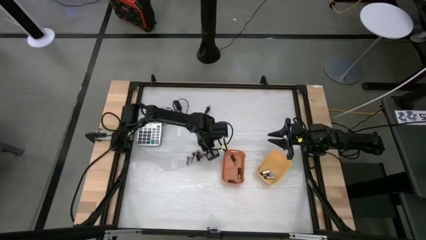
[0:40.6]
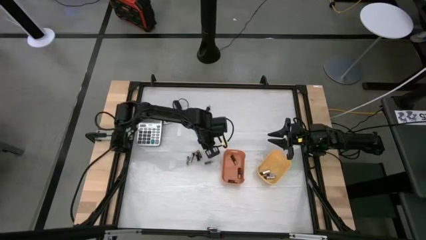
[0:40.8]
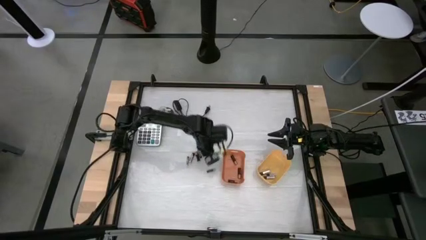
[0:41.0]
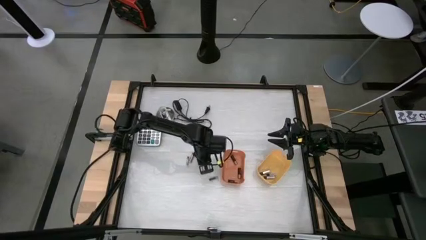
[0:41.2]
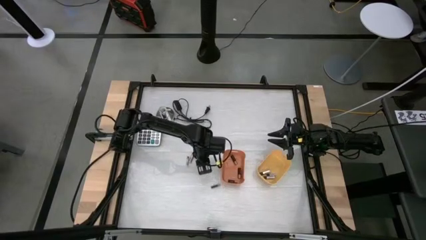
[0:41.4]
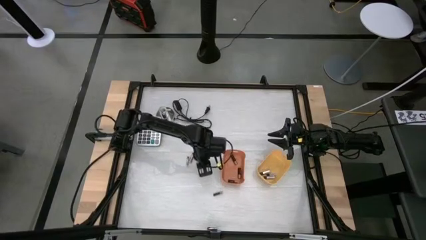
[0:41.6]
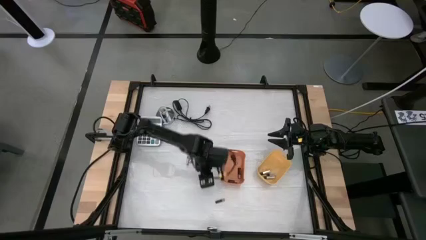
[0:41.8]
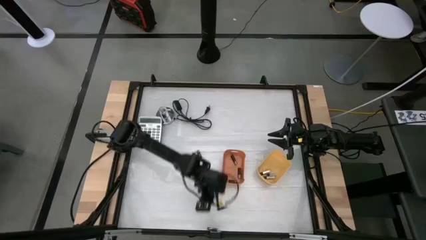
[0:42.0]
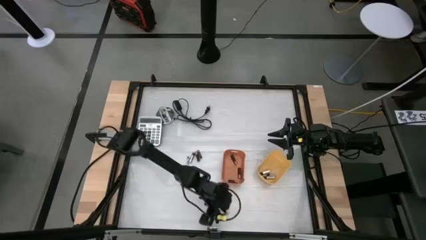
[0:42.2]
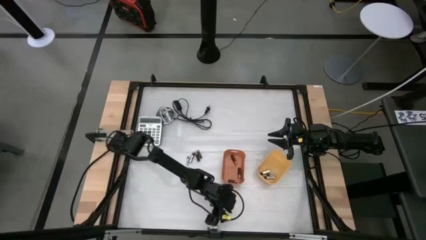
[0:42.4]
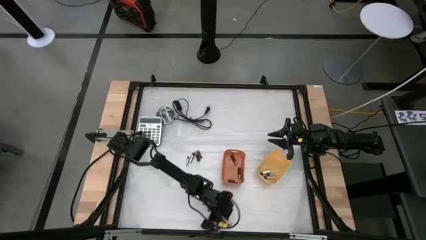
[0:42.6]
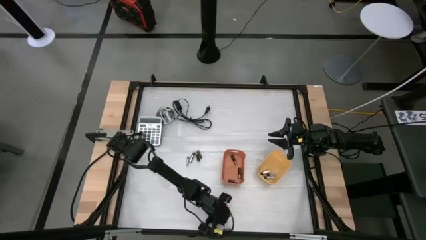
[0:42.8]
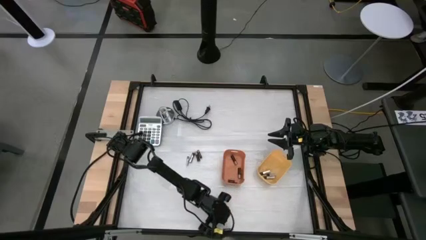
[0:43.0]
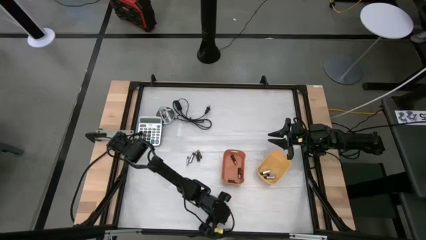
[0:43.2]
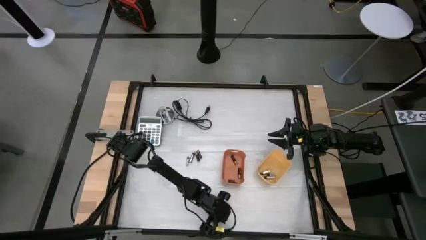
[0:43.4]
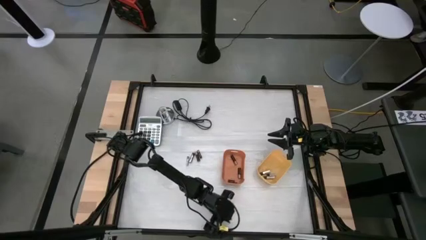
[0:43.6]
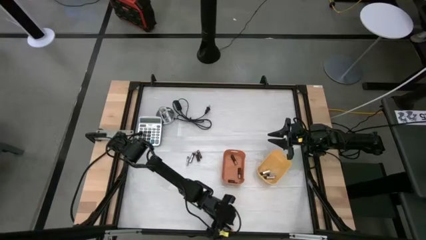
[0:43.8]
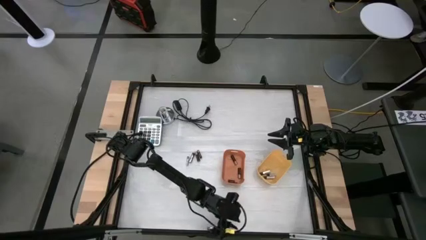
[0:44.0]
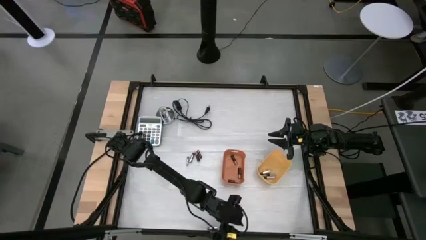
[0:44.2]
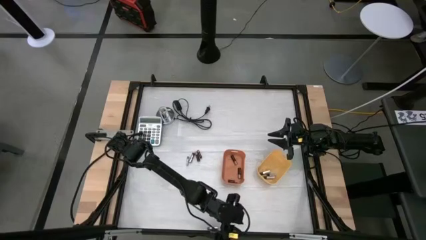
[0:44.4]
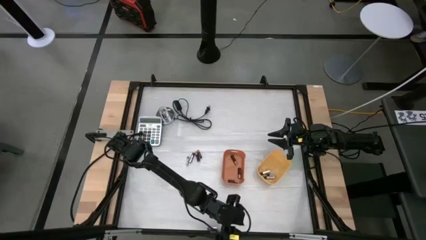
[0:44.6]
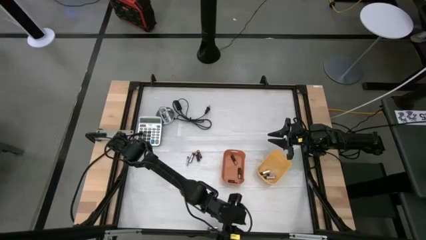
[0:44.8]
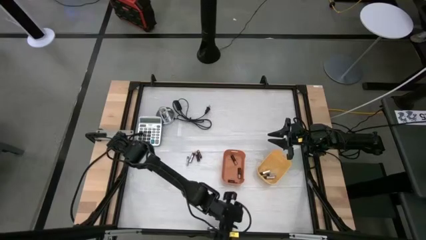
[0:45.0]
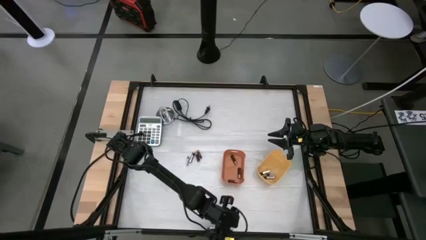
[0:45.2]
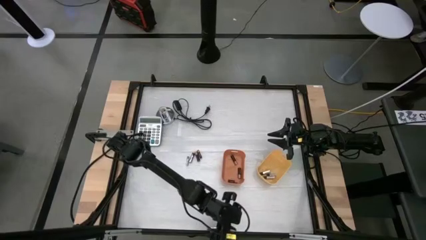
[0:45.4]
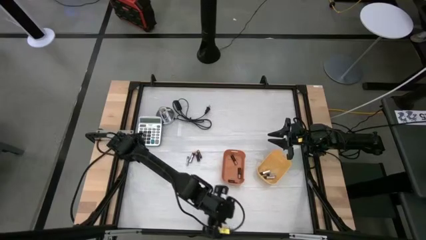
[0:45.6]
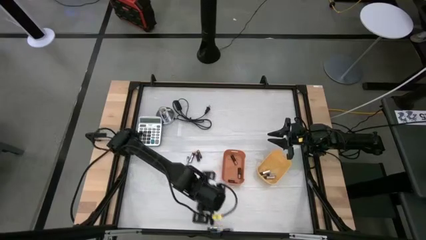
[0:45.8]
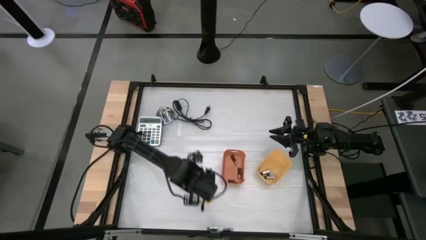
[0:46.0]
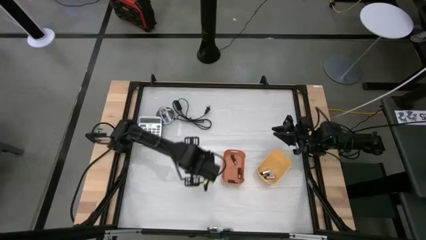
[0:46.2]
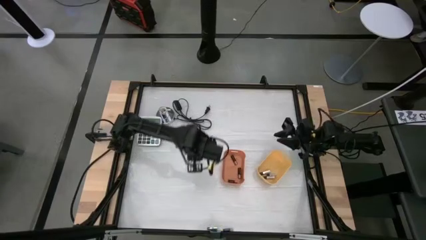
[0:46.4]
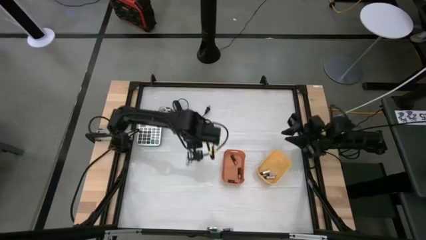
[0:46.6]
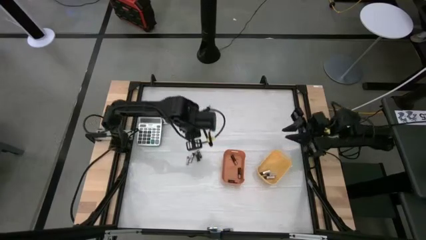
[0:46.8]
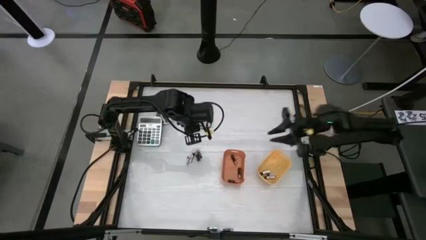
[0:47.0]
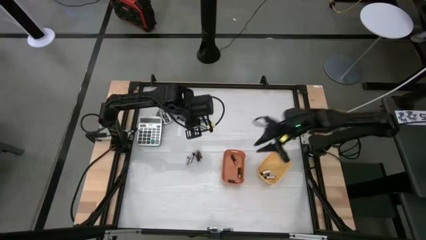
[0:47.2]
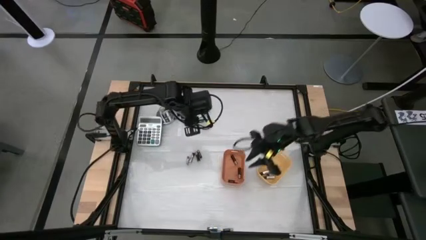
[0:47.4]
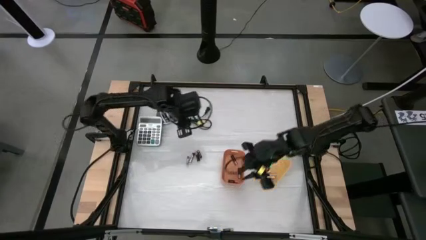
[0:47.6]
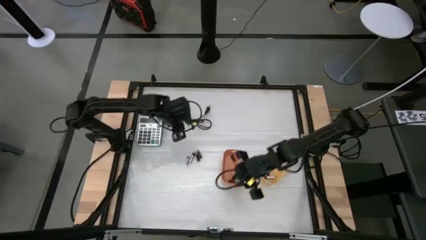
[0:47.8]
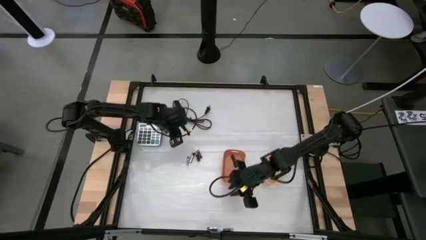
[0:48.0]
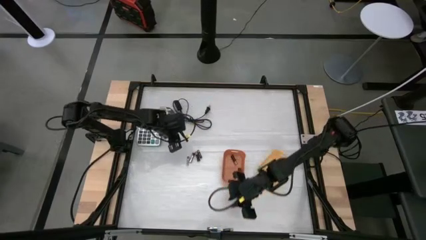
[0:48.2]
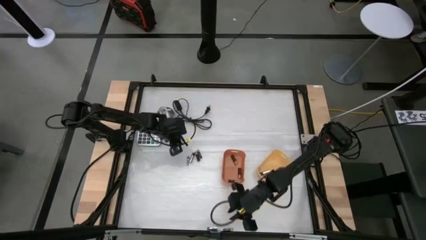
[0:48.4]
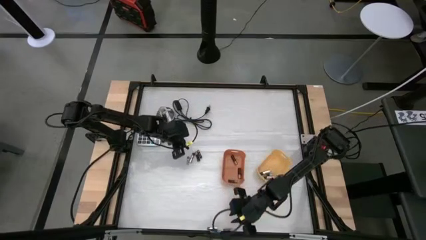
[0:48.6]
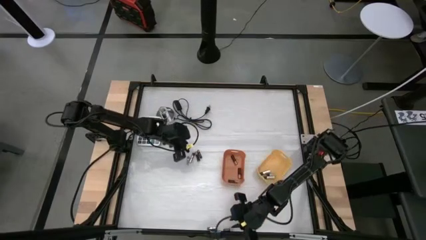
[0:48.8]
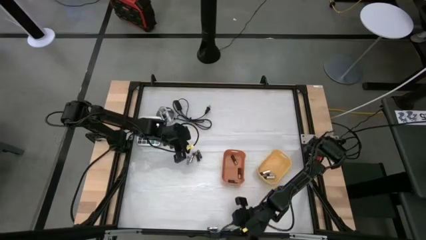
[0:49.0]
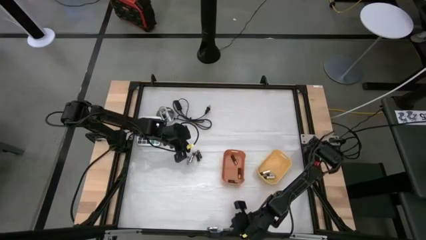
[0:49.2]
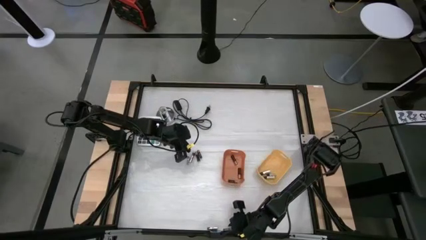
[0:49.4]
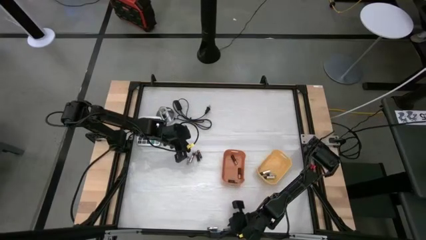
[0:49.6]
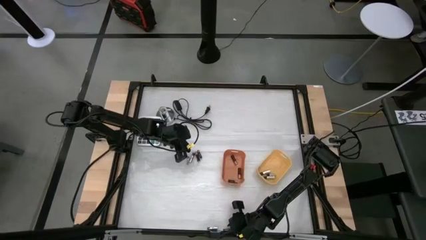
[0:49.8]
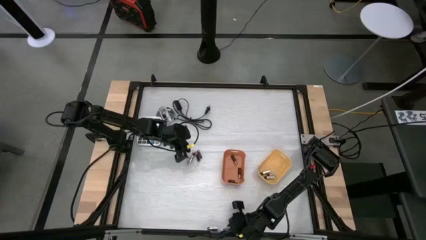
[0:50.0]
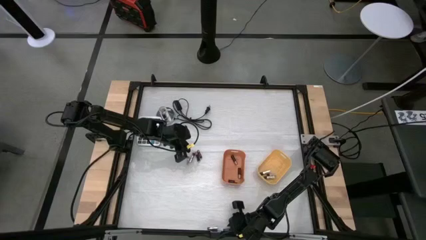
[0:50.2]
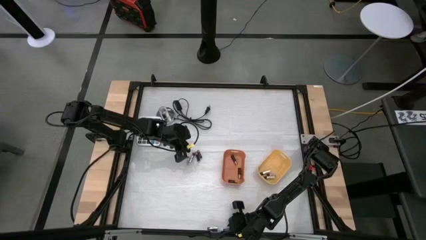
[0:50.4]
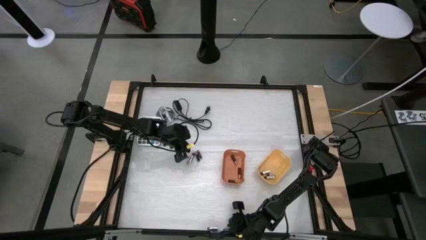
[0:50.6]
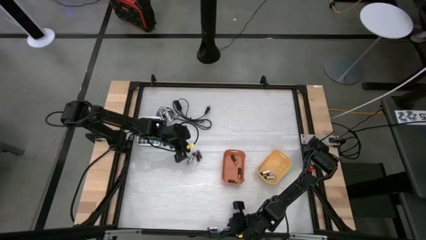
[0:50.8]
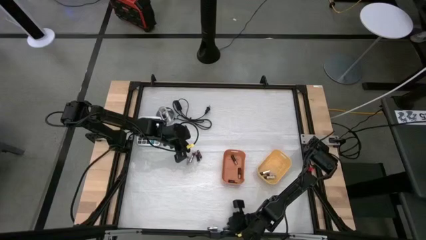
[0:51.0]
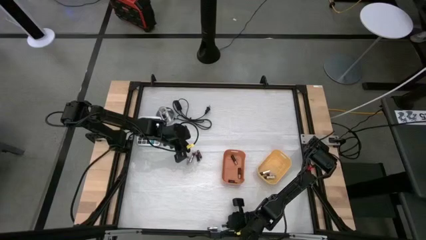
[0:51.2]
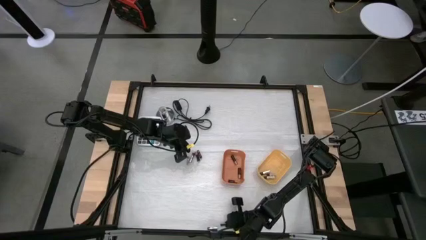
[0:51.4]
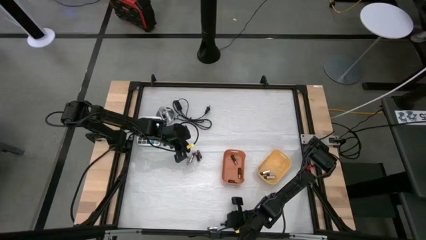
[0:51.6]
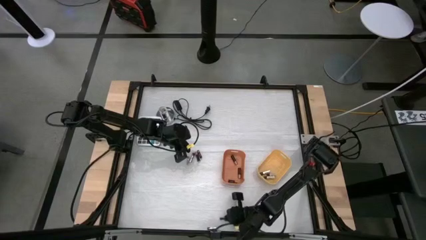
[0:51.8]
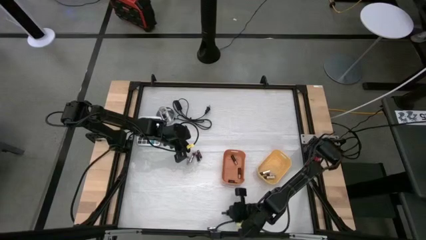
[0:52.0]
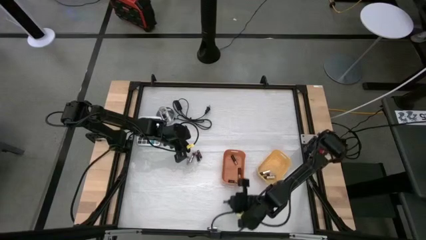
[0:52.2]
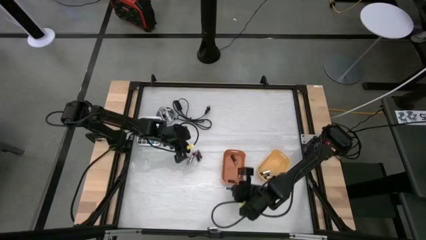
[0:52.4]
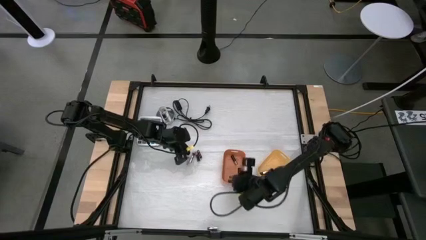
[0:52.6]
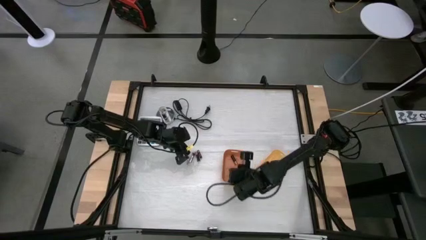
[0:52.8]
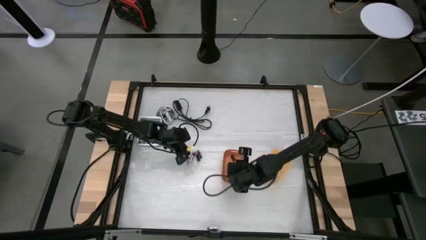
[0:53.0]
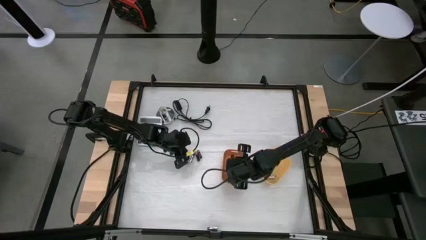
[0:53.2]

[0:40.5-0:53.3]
Task: Sort batteries
Put the black battery into the orange bin

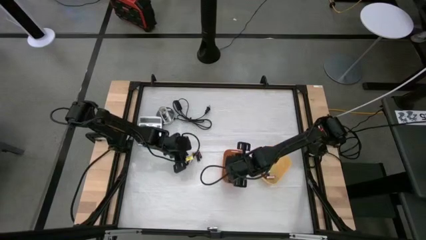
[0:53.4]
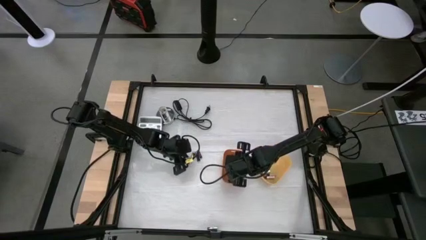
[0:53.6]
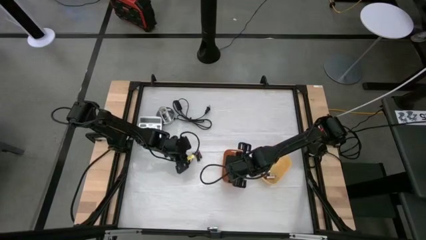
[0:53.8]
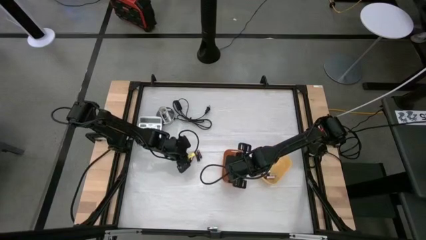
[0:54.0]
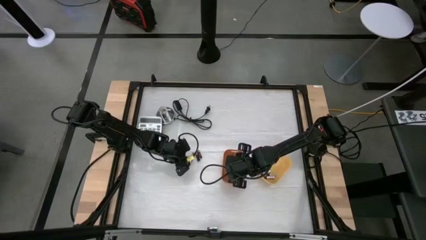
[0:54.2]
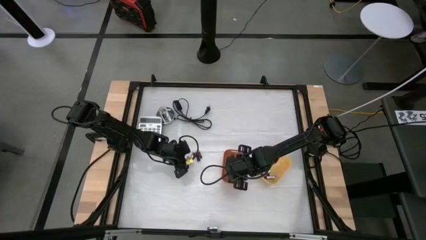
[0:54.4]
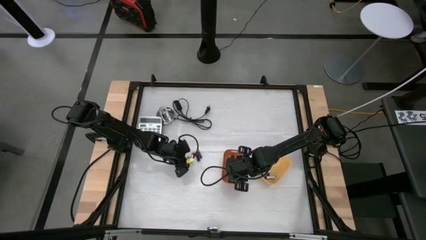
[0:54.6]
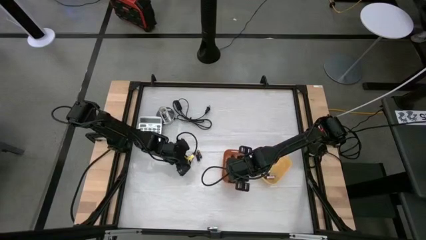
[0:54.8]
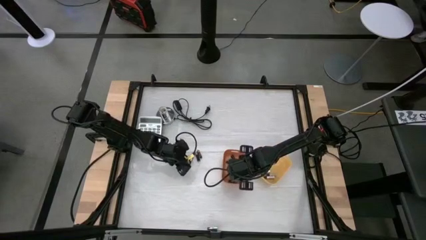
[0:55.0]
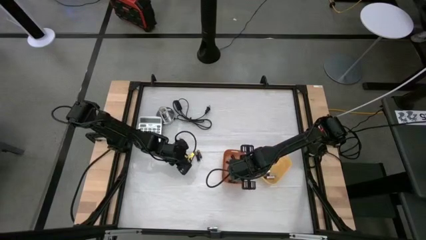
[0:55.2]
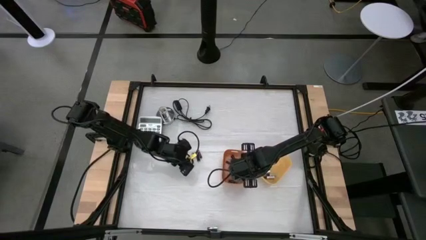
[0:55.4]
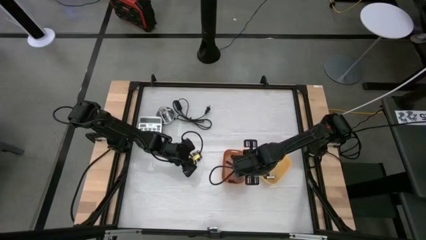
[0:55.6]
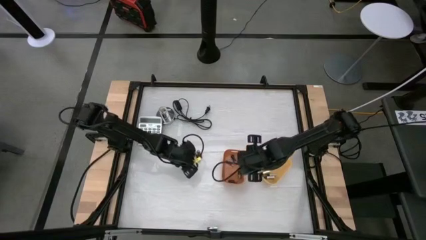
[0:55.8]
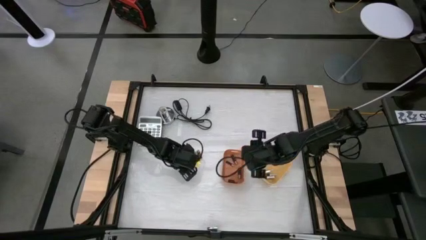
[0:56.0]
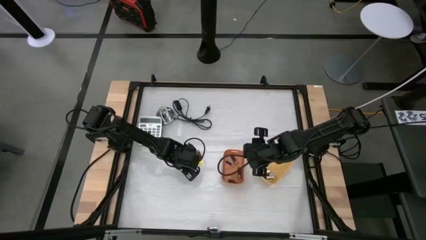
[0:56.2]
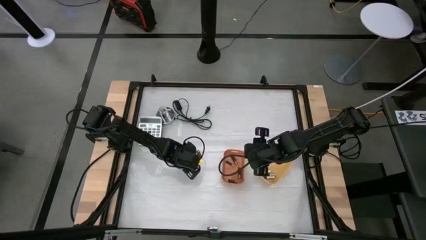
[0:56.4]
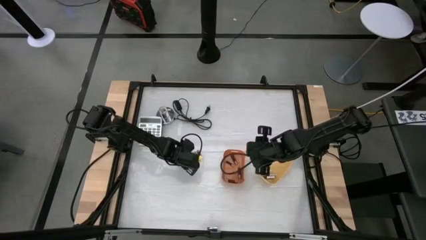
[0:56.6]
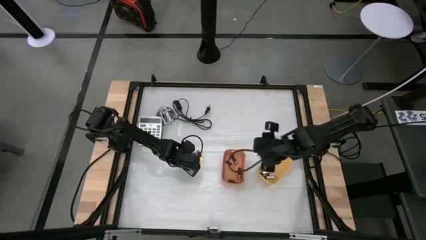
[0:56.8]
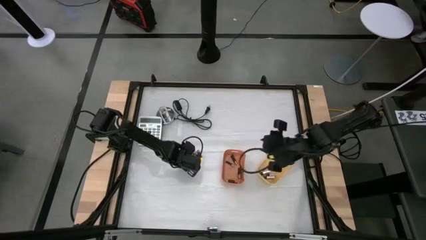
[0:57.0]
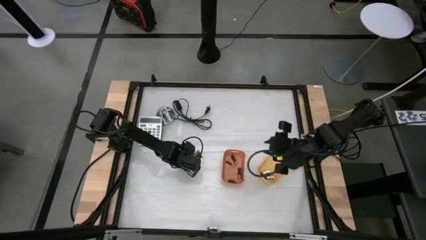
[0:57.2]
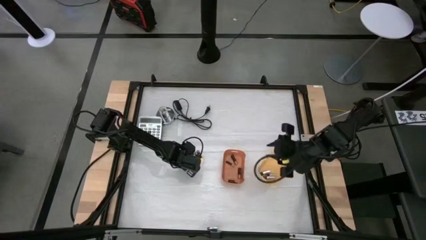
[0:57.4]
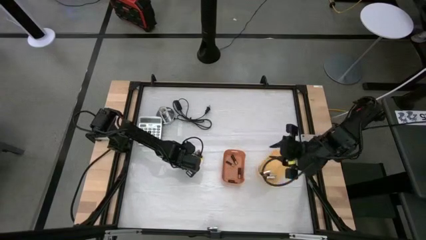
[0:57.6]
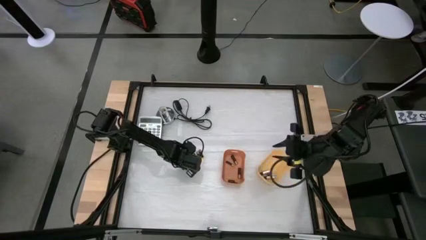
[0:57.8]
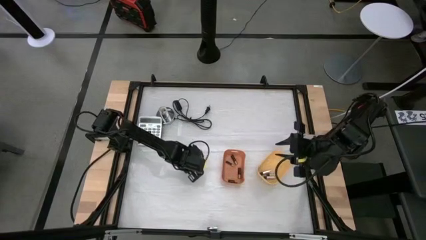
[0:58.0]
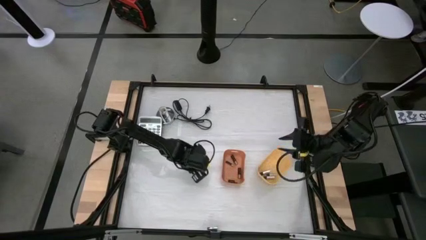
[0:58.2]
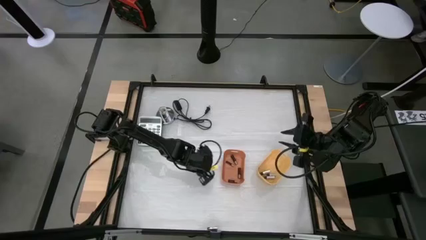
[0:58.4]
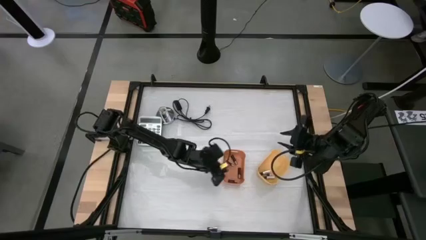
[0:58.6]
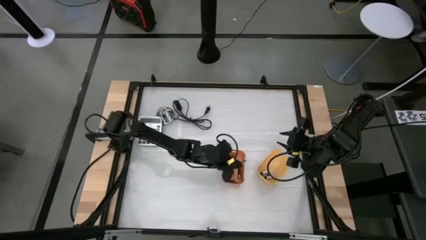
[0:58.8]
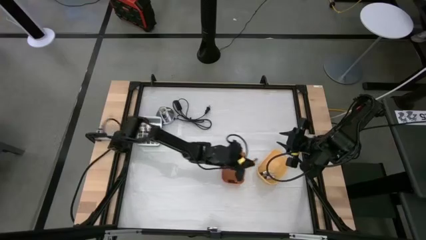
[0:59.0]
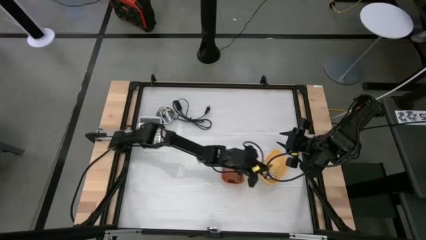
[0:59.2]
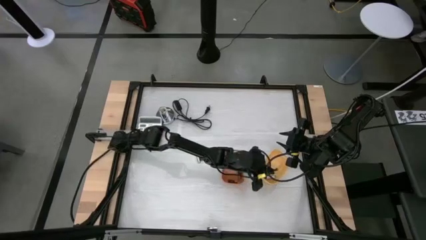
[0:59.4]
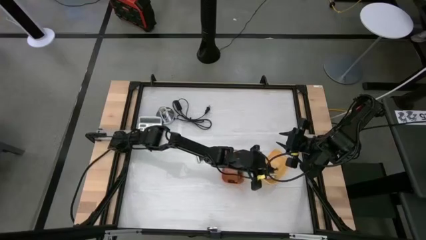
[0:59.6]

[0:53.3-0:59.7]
Put the silver battery into the yellow bin
